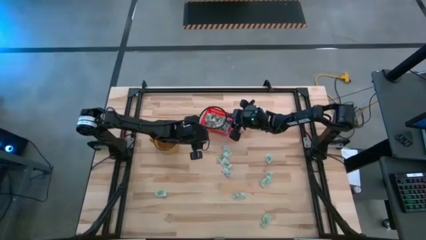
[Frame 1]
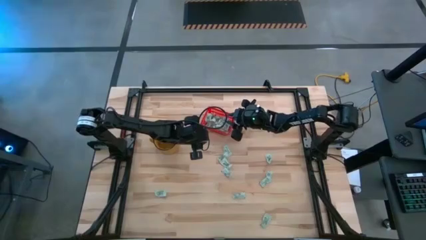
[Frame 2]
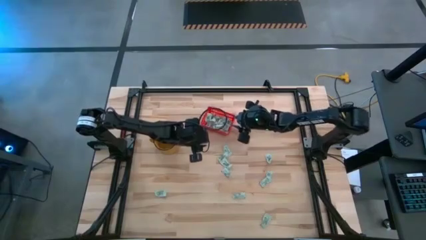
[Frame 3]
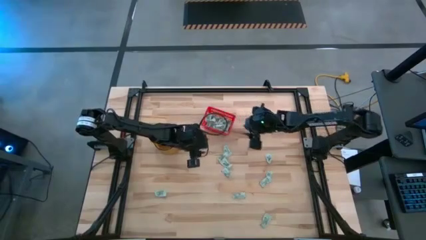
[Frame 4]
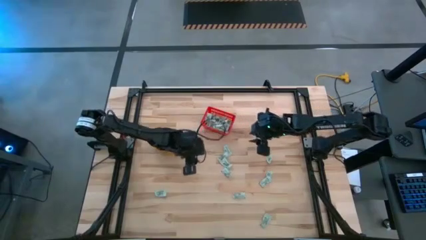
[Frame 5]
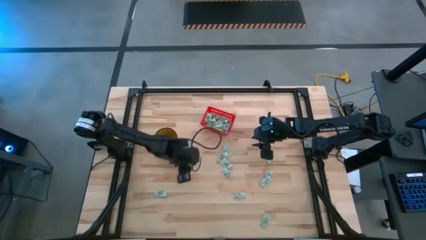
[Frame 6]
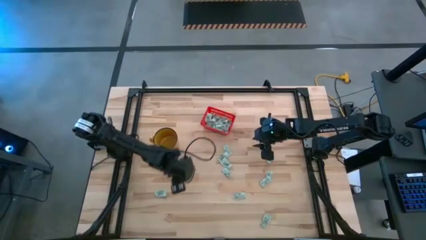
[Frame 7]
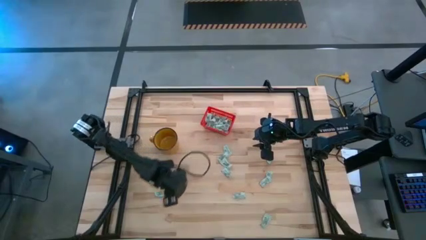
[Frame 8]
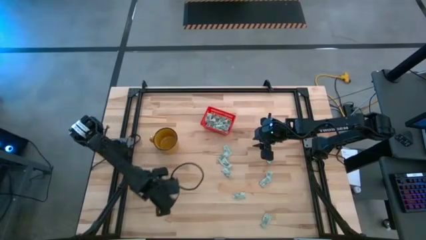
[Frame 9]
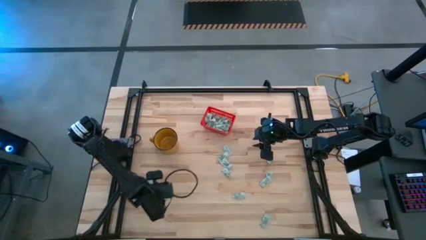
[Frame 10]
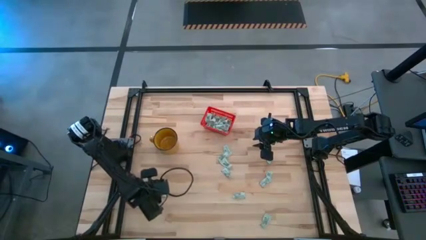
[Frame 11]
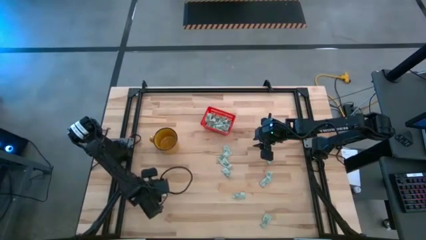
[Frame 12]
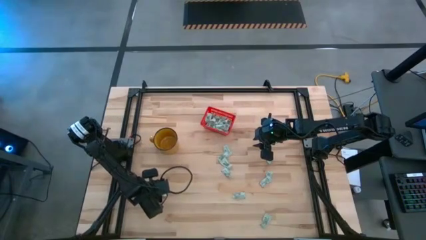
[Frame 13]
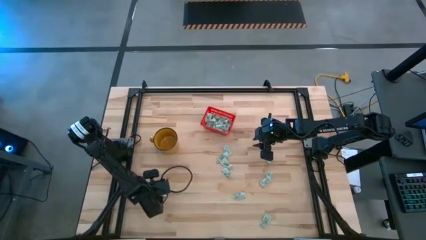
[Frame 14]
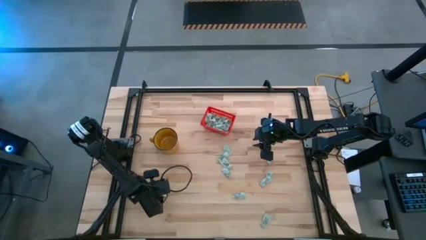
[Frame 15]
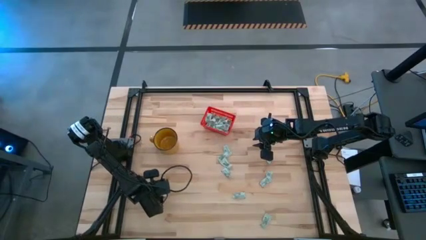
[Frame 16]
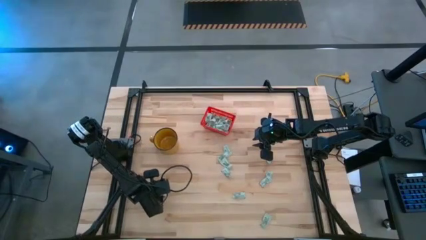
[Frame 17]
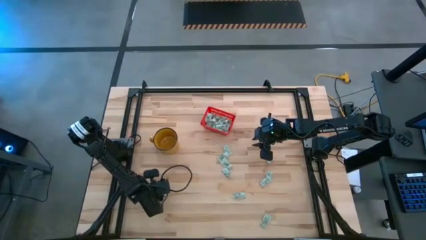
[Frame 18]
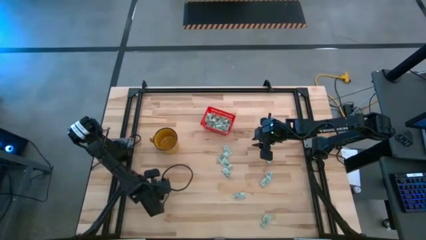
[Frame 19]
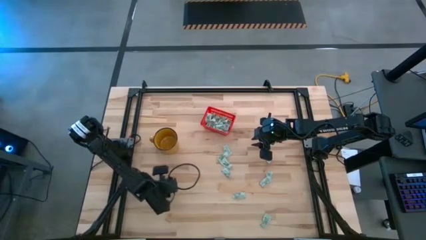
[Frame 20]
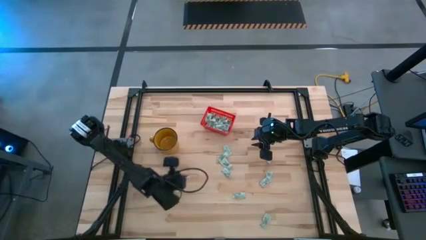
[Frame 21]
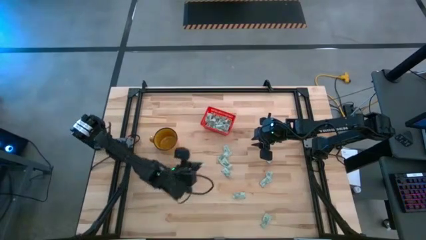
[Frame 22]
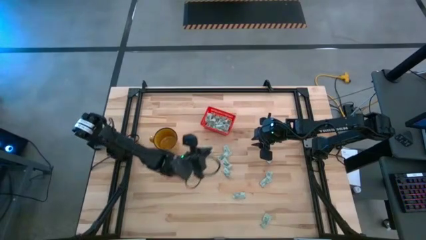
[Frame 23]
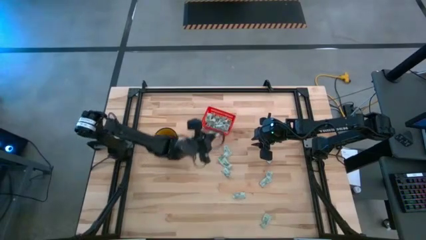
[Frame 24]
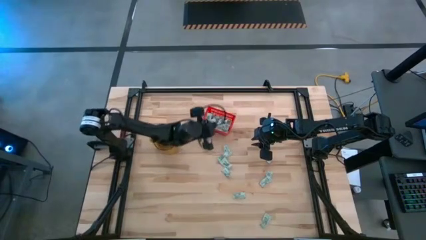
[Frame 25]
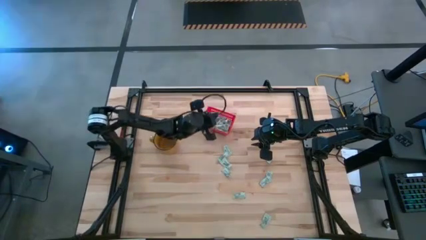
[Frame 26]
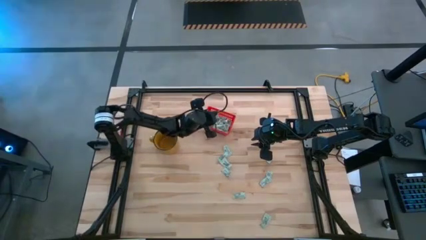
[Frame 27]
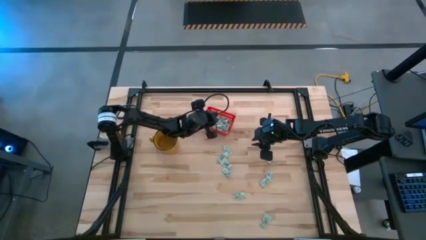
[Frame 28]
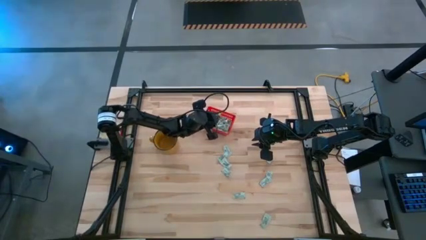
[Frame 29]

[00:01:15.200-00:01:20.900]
Task: Pick and place Stevia / Truvia into bins
Put the stevia packet into the red basket

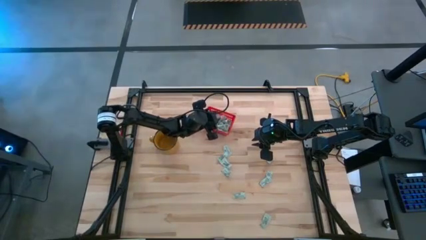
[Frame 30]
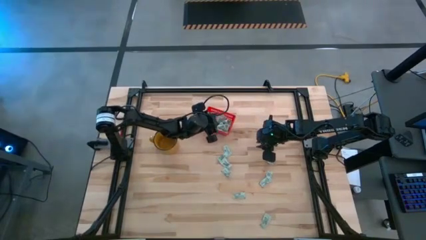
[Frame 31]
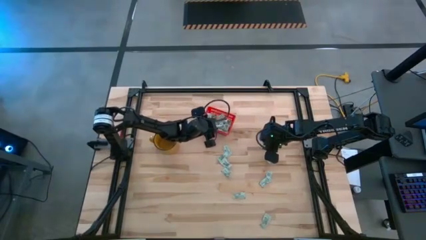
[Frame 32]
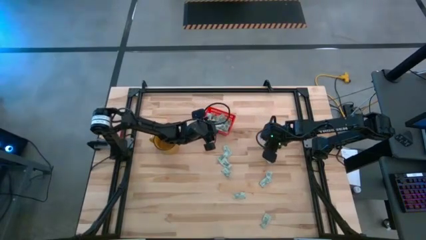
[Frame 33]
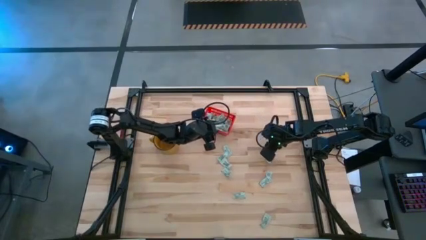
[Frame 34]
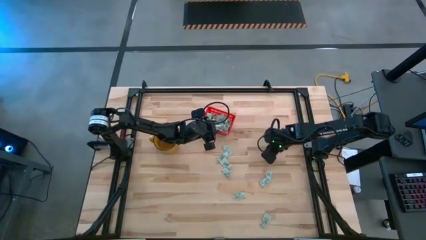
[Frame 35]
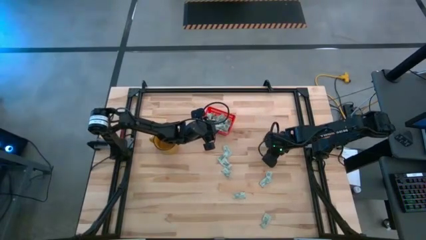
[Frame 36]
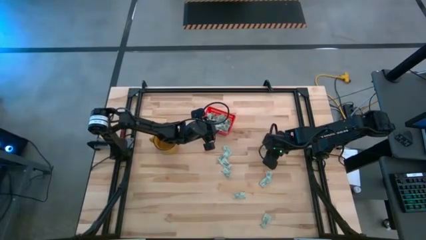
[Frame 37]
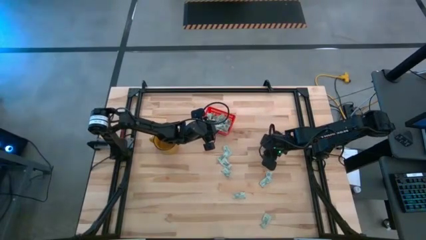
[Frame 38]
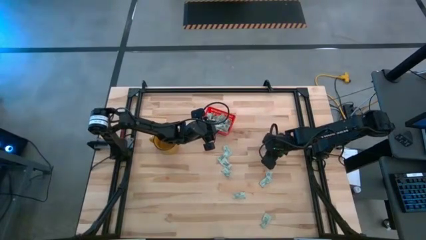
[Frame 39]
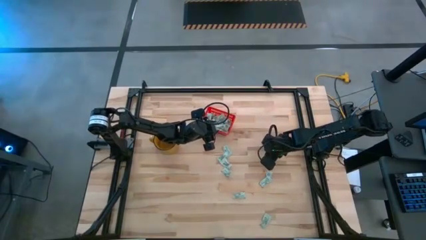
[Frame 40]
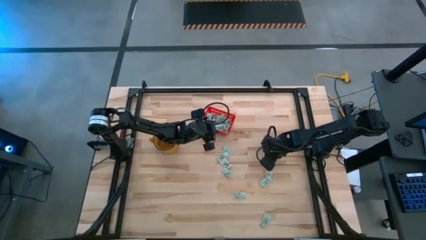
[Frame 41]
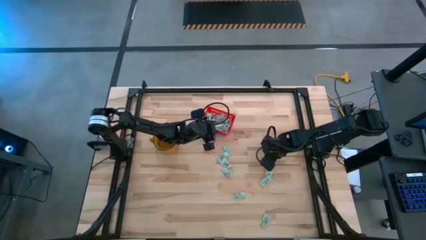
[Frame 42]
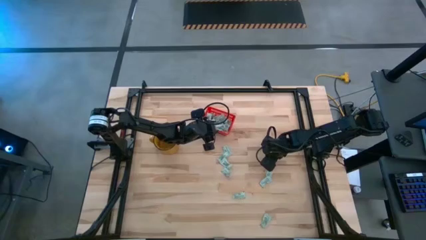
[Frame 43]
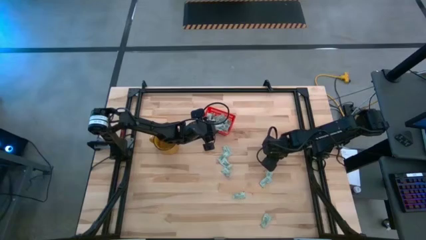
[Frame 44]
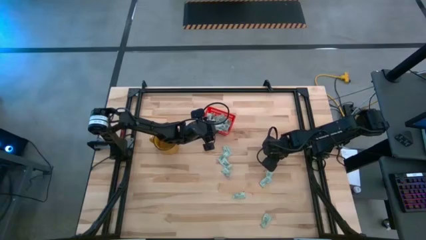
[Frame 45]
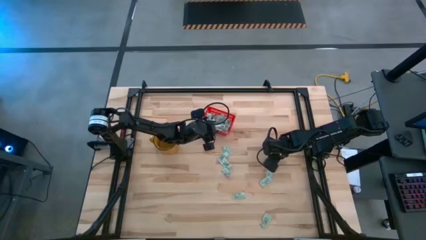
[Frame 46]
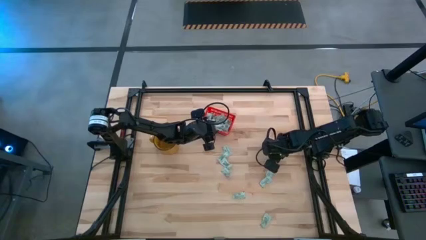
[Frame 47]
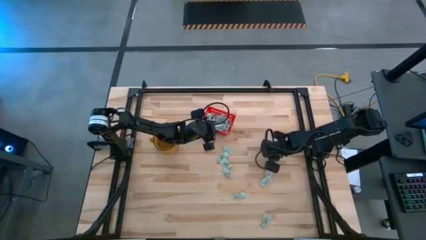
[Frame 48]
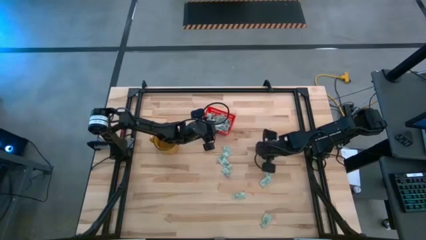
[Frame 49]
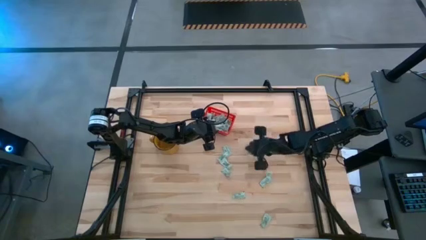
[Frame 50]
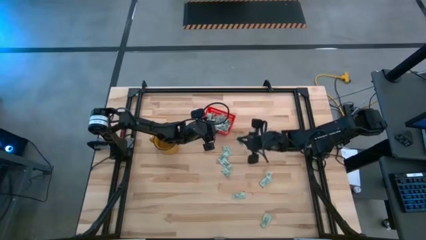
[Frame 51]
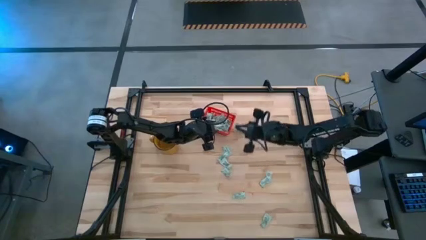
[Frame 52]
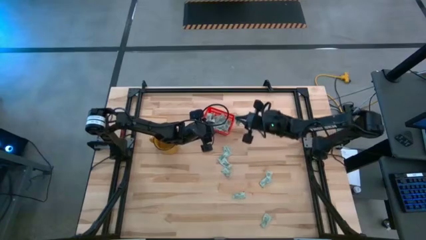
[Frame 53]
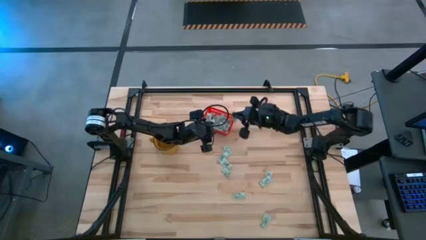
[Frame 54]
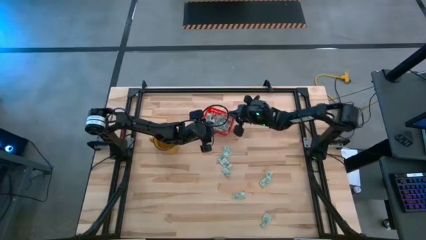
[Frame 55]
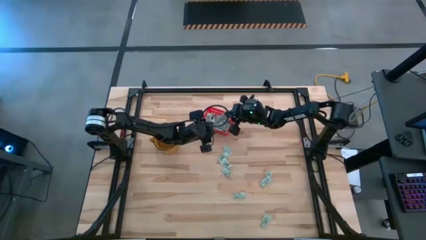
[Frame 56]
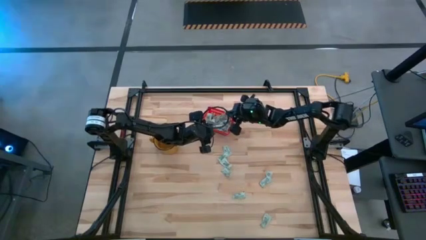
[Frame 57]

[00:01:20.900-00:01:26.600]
Put the stevia packet into the red basket

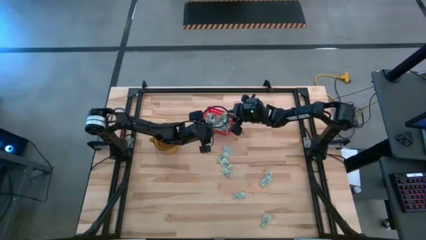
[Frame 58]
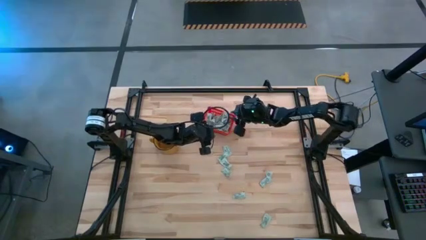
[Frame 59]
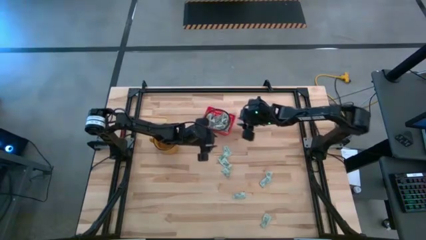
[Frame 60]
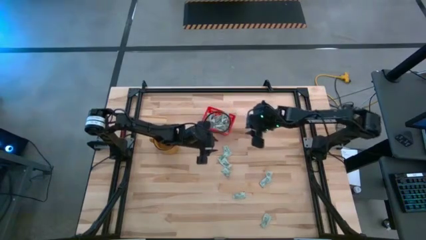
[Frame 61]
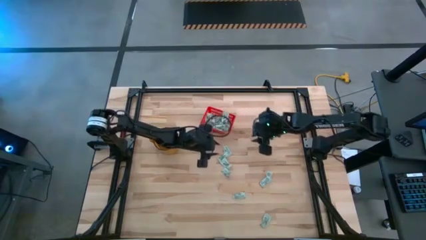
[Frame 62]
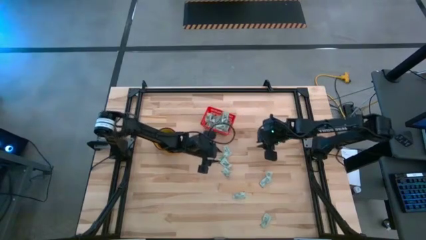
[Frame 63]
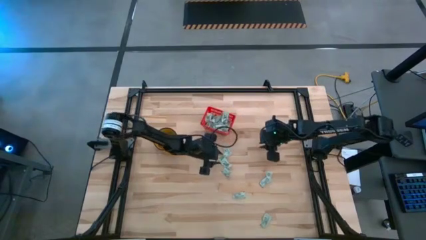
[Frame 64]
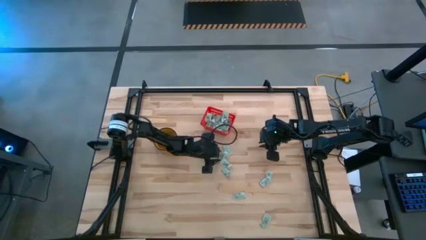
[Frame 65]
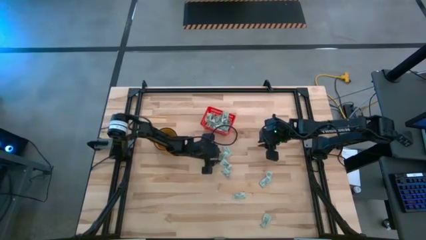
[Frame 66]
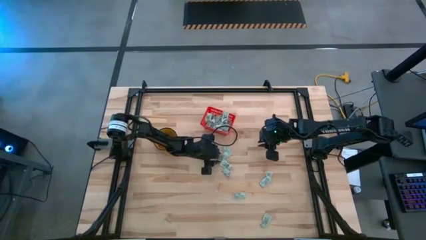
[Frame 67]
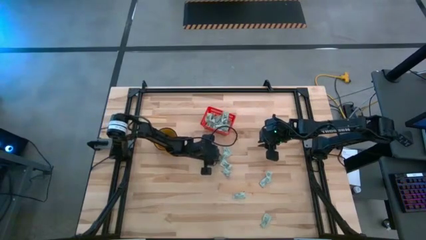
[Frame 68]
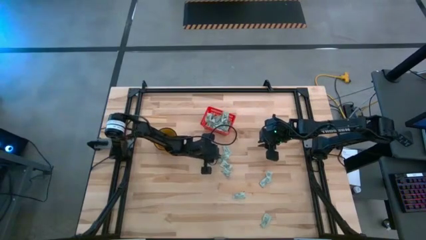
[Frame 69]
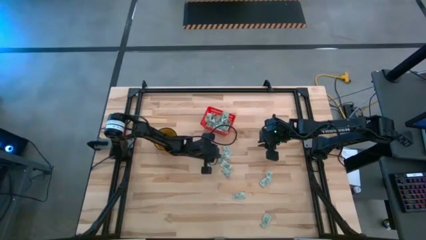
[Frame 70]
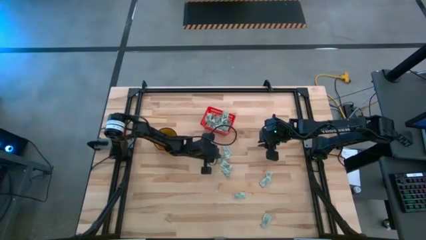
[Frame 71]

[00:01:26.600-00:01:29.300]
Put the stevia packet into the red basket

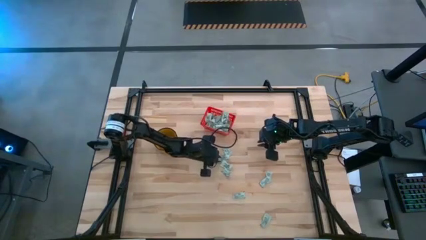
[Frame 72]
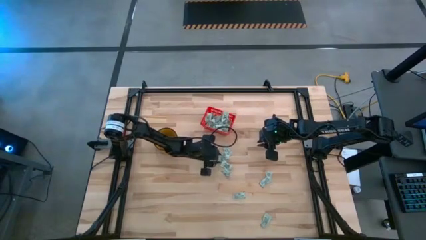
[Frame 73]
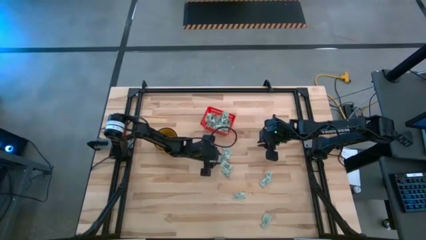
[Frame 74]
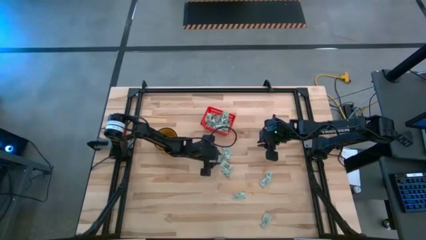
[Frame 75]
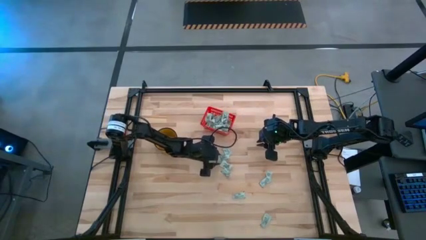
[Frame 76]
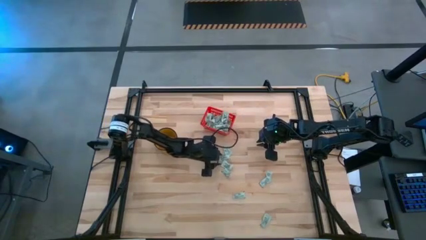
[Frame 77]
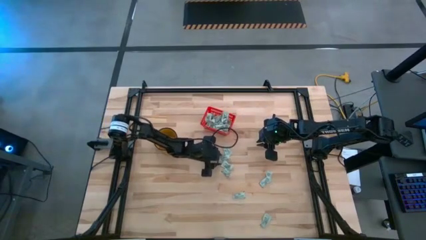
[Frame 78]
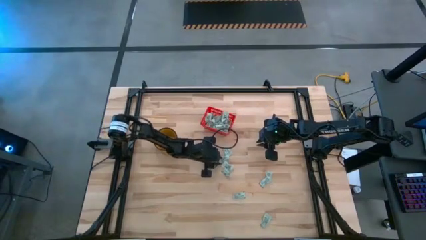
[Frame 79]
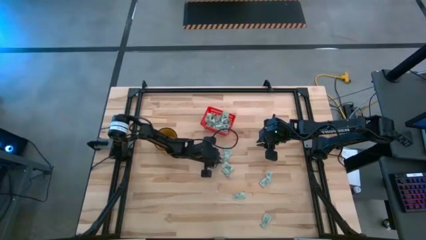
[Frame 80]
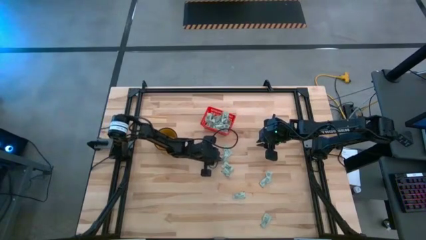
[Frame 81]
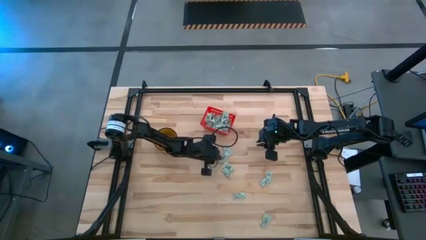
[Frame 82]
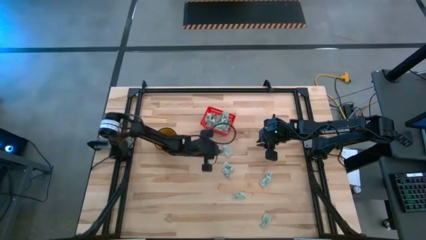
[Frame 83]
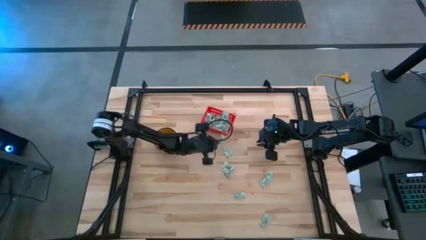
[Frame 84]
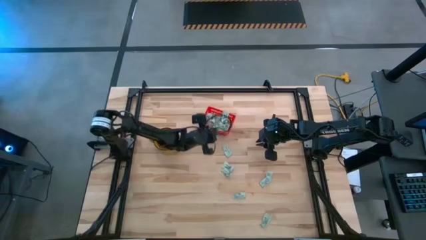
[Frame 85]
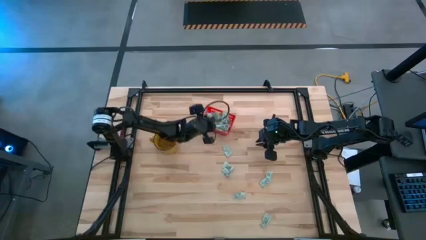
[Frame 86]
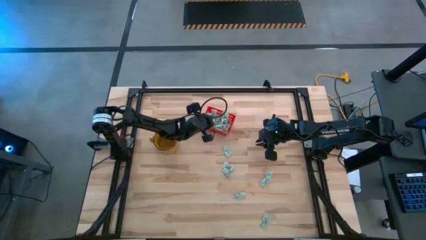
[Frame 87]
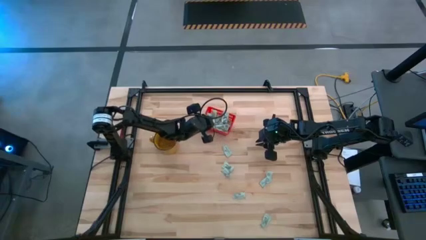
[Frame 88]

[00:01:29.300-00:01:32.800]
Put the stevia packet into the red basket
